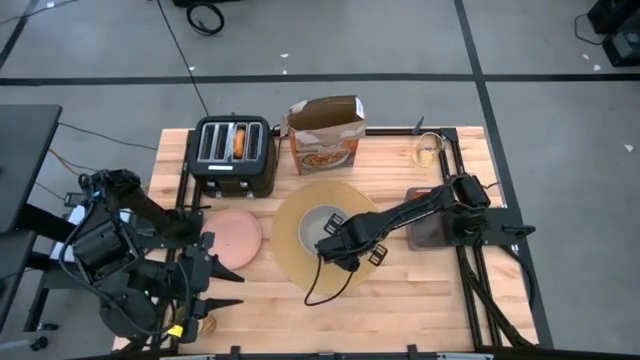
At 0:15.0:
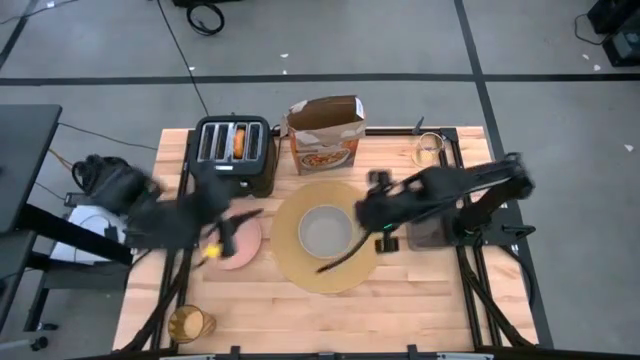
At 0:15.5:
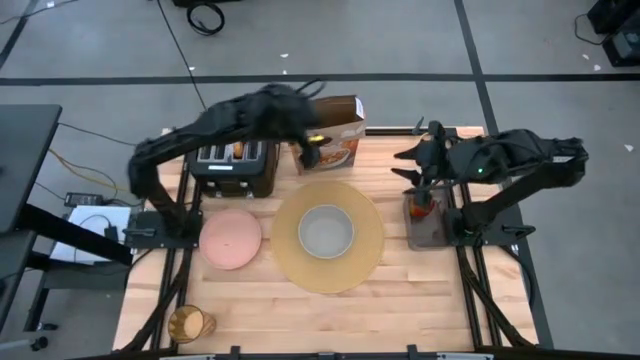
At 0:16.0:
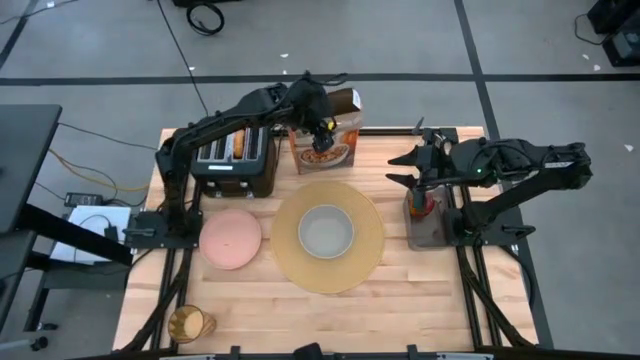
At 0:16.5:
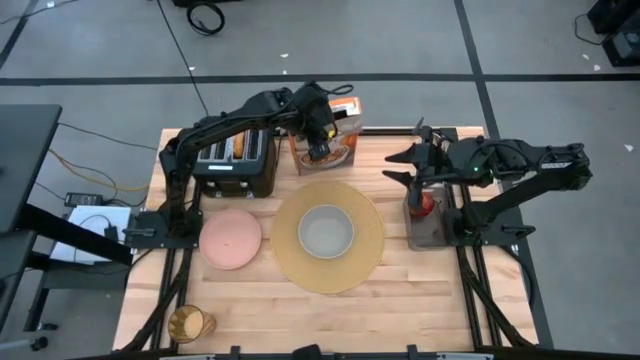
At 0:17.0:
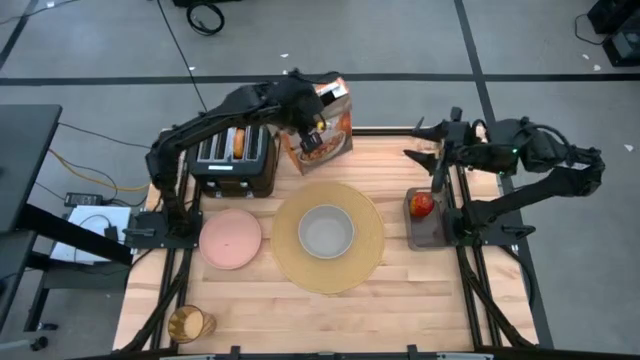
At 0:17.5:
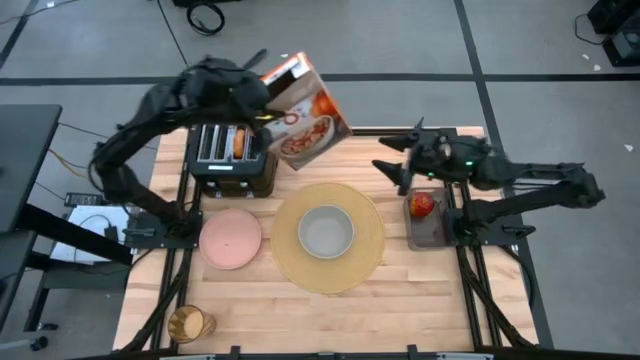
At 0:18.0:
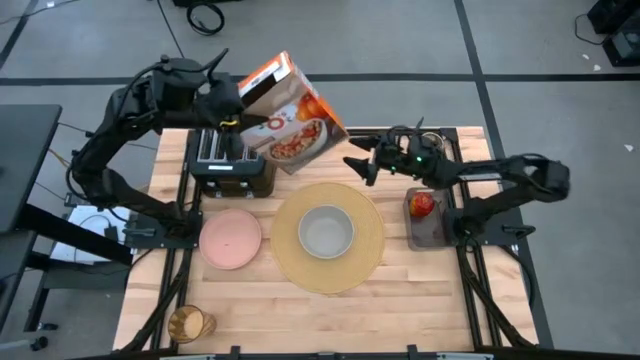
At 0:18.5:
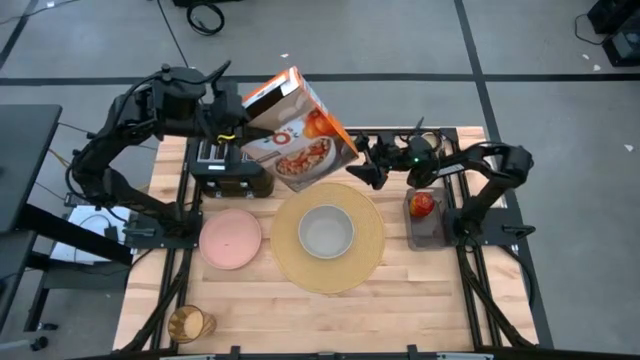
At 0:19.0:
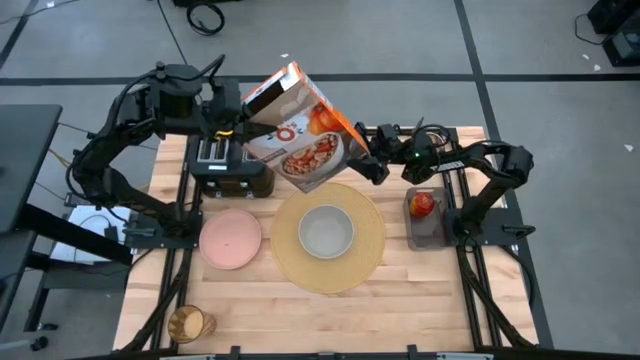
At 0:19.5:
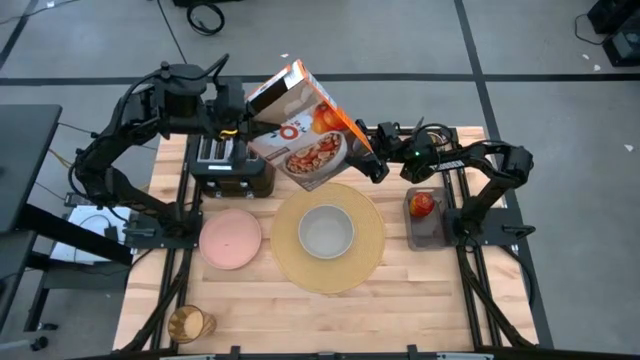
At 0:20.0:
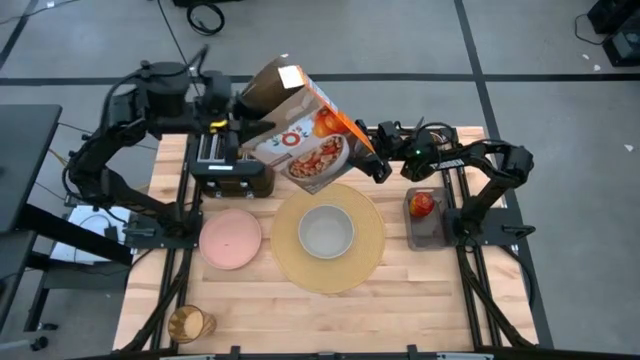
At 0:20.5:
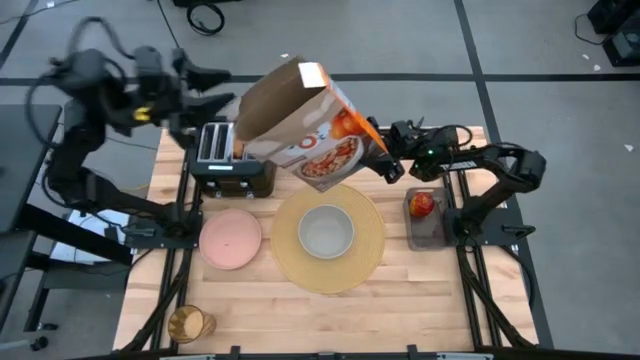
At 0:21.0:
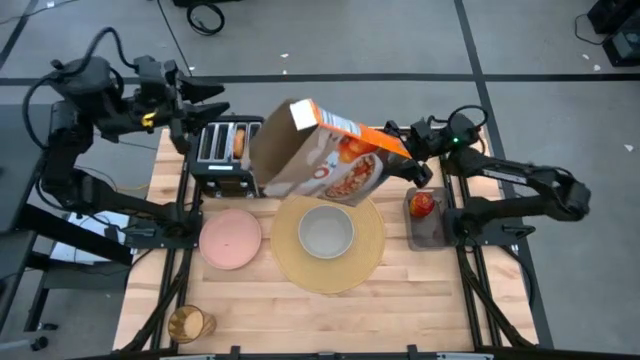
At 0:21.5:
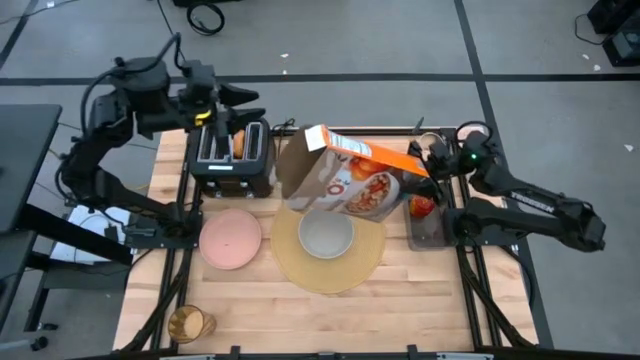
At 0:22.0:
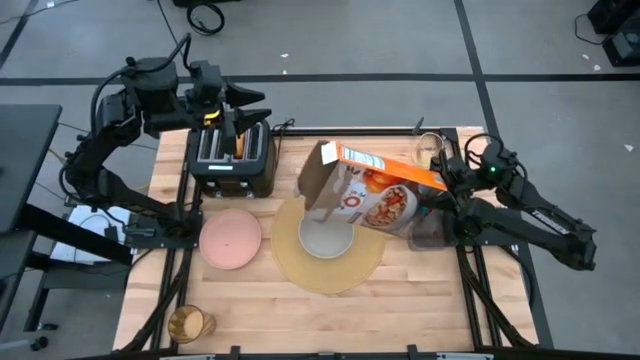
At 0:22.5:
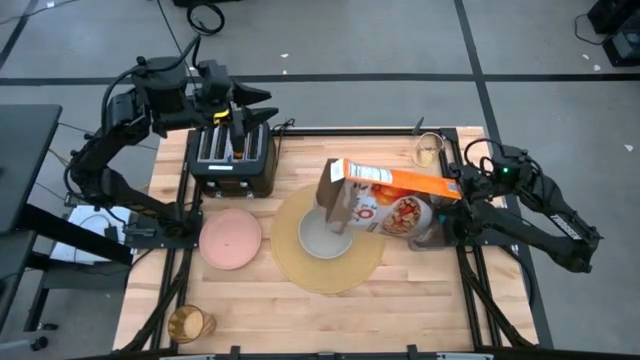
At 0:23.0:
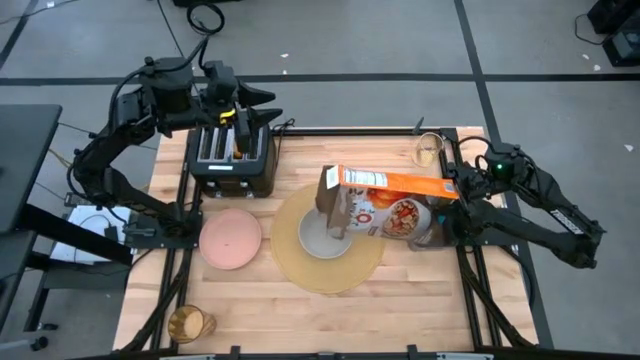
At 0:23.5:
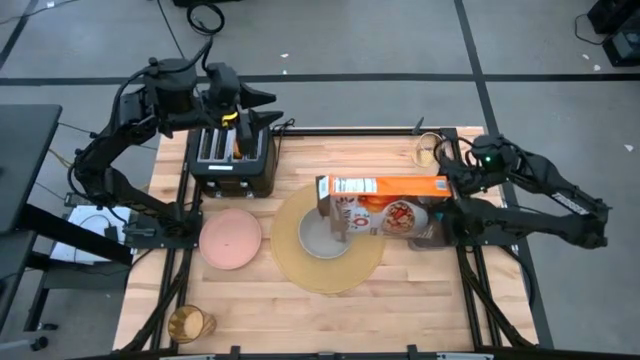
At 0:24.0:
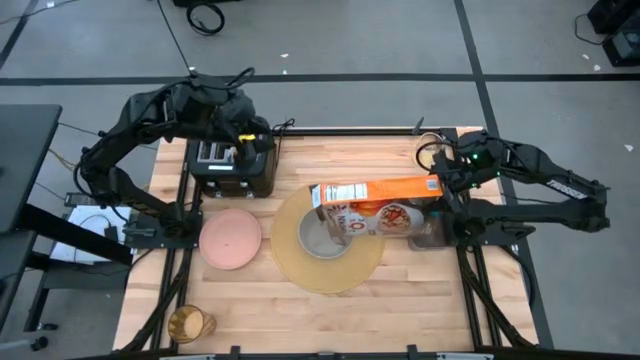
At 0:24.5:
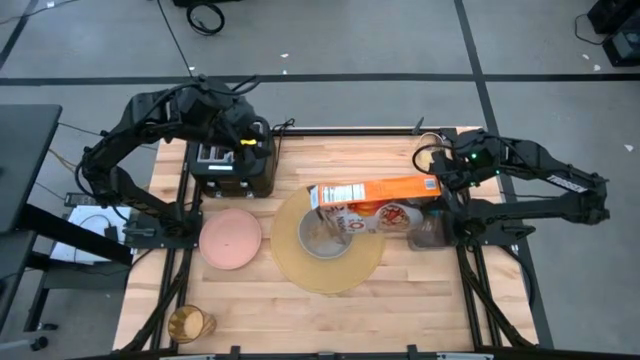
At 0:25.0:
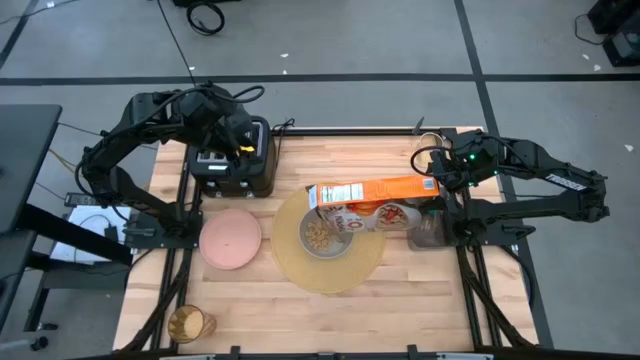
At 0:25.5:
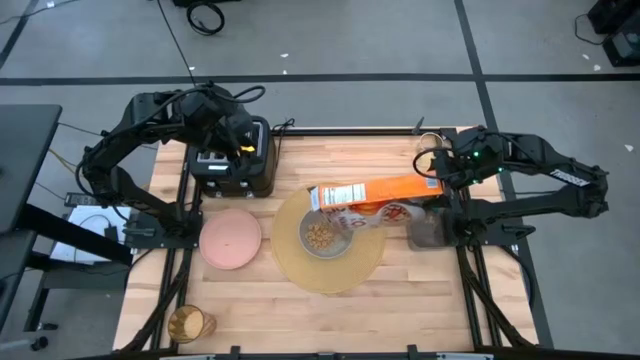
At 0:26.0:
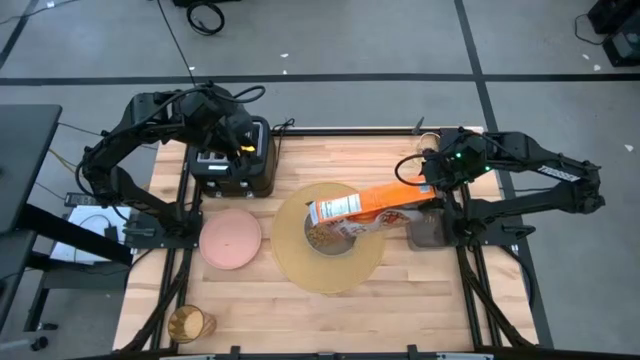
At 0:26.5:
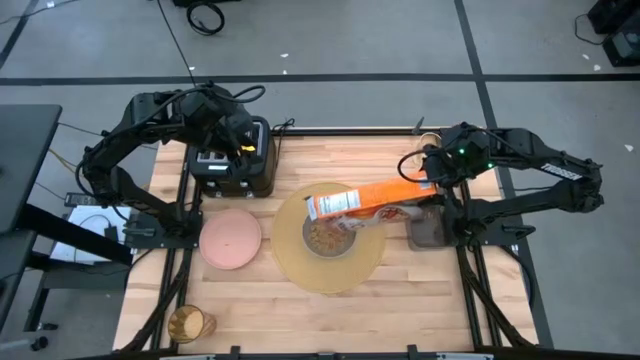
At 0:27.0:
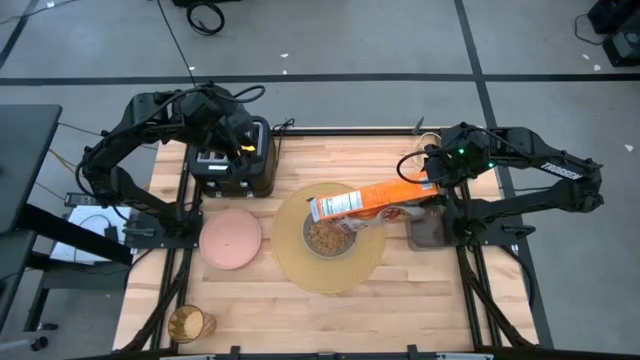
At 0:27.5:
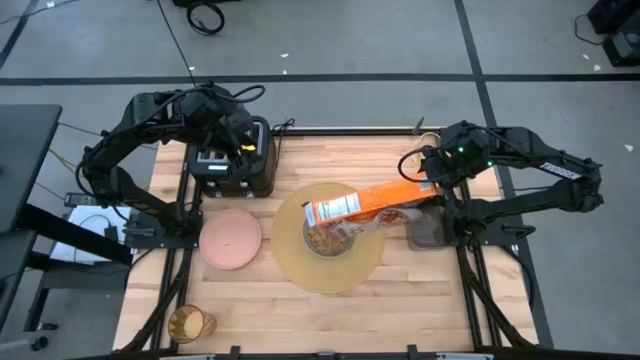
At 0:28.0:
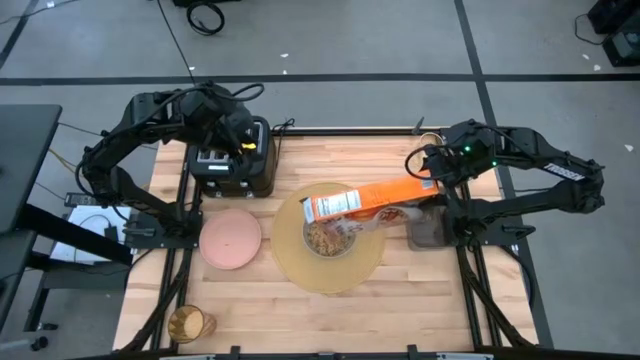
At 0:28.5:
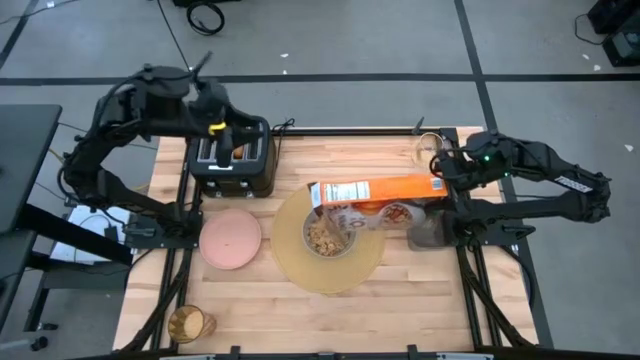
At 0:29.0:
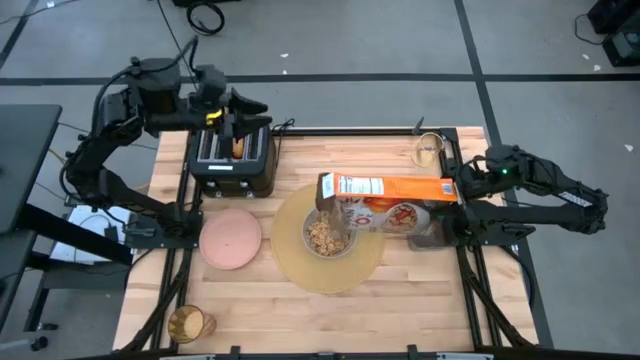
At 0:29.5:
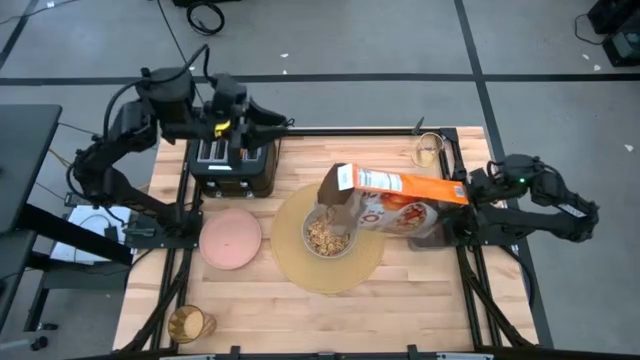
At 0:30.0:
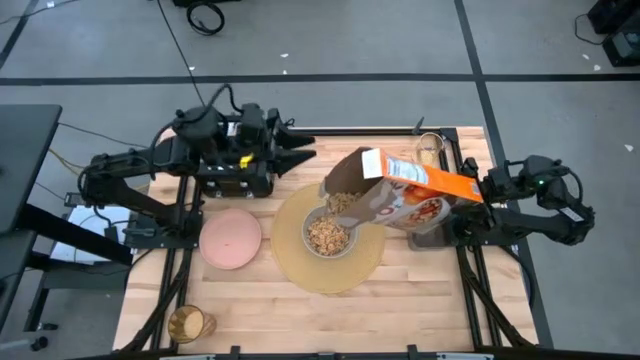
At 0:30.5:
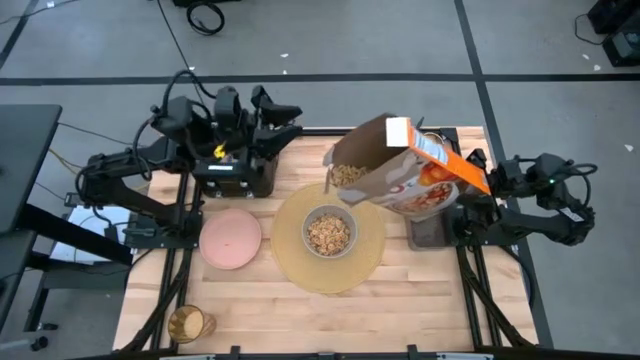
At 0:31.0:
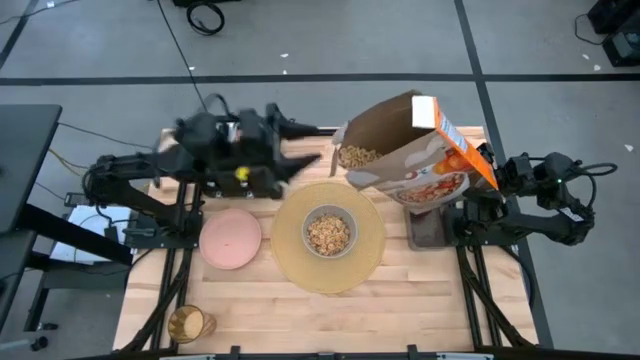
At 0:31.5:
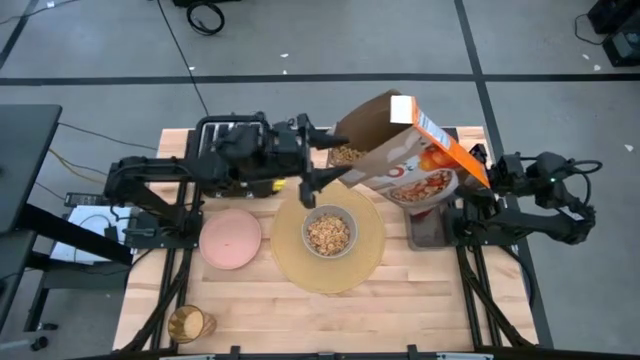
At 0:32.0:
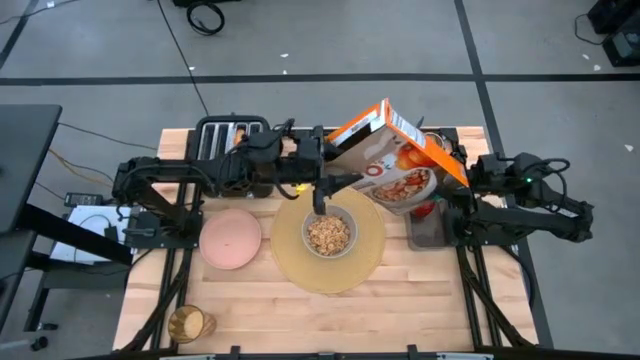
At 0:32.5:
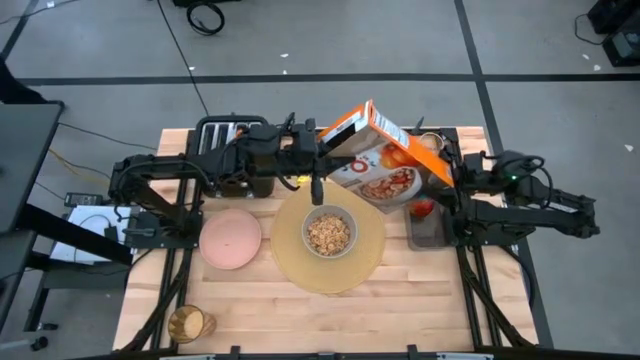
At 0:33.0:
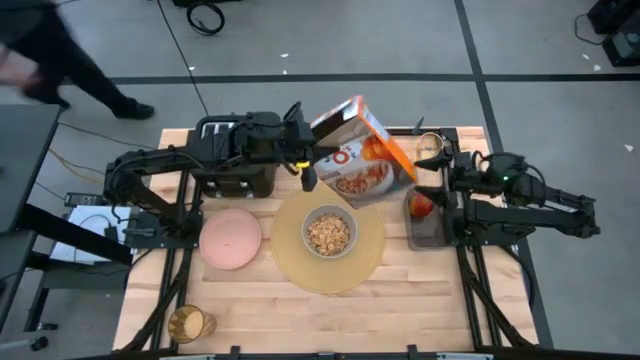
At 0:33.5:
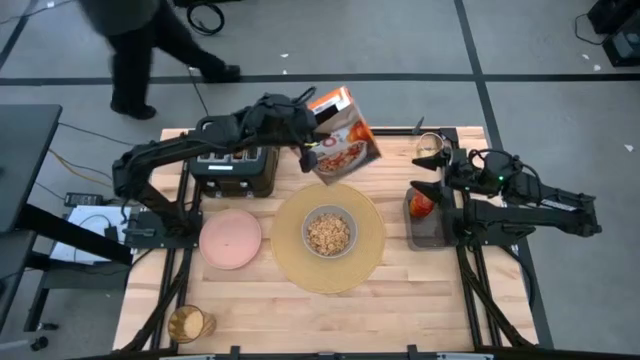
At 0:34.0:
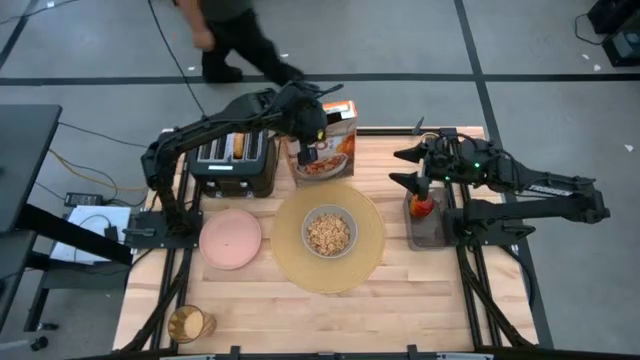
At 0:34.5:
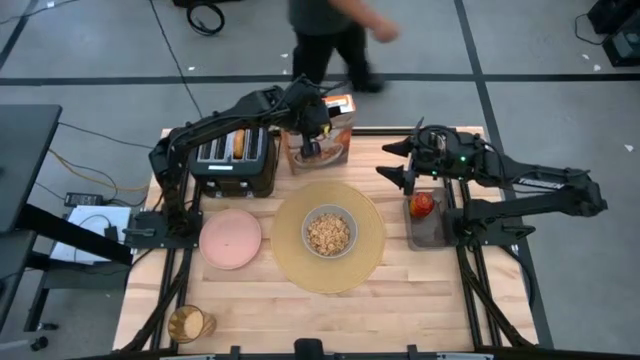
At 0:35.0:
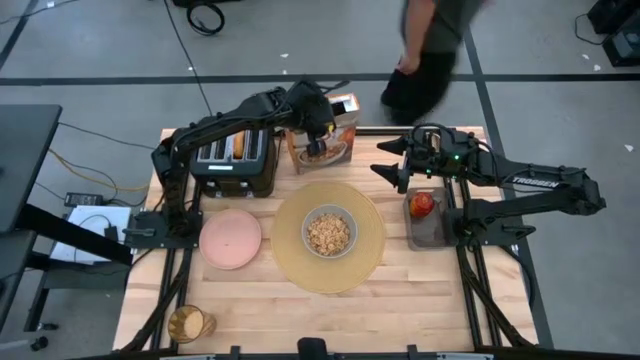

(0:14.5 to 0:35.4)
Task: Arrange a breakfast setting
Pour the cereal from the cereal box into the gray bowl
